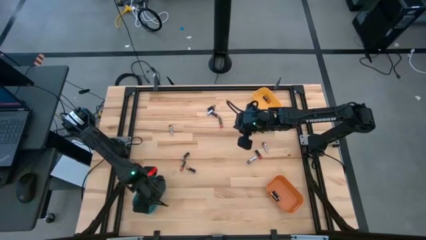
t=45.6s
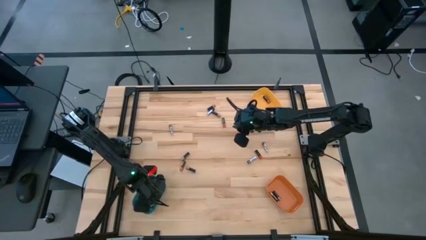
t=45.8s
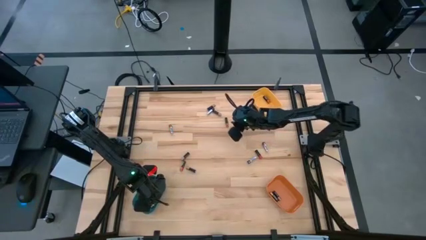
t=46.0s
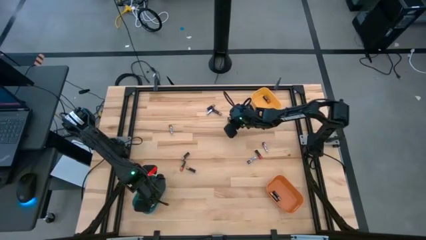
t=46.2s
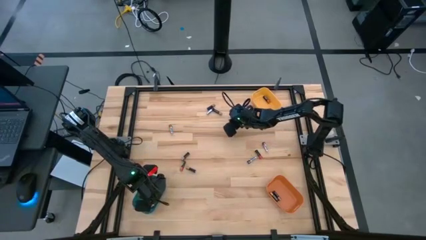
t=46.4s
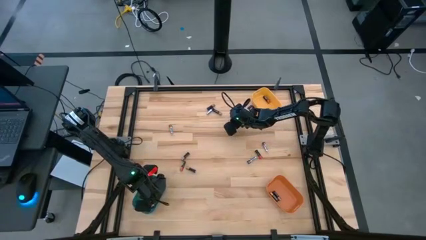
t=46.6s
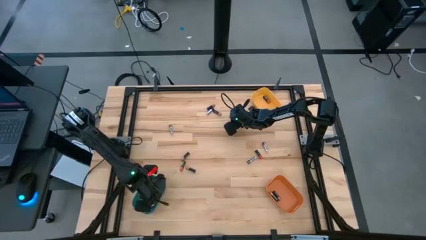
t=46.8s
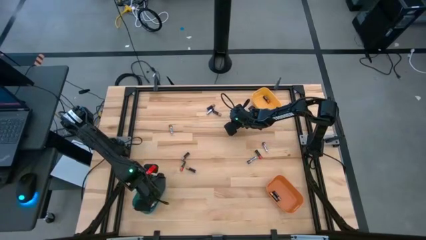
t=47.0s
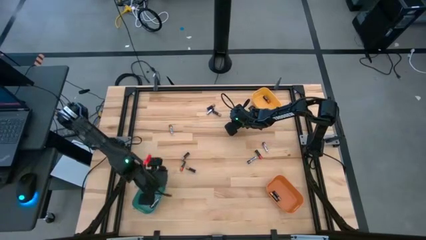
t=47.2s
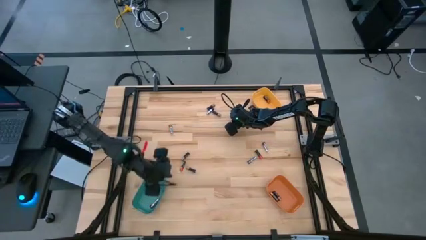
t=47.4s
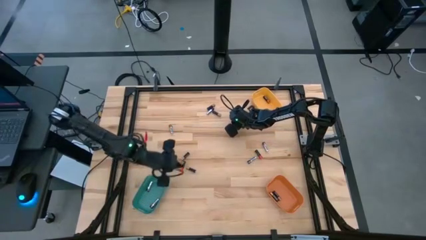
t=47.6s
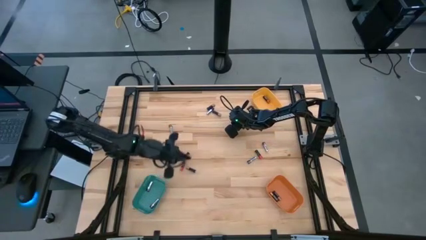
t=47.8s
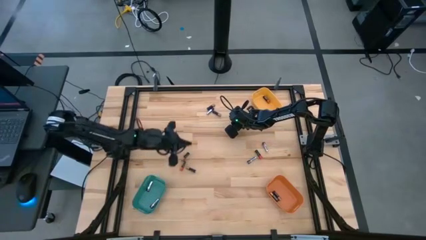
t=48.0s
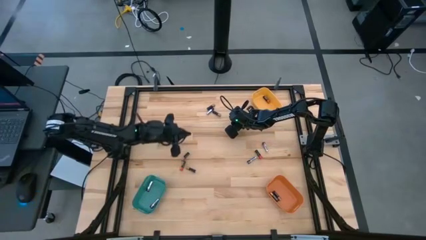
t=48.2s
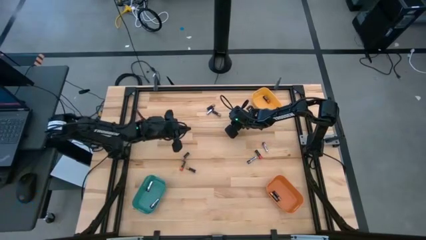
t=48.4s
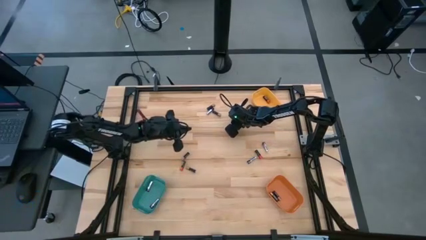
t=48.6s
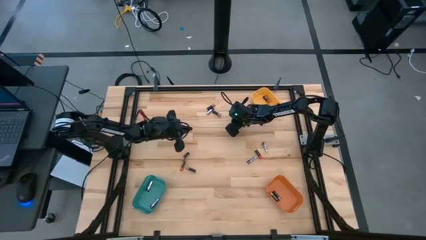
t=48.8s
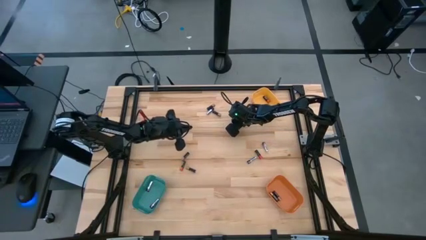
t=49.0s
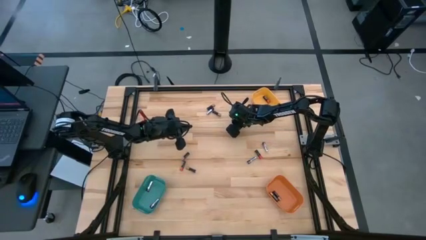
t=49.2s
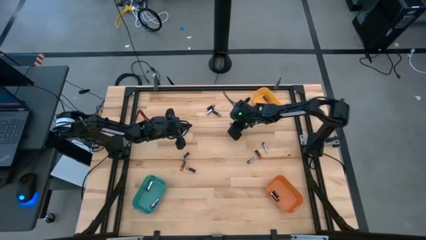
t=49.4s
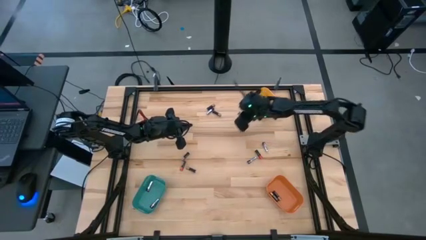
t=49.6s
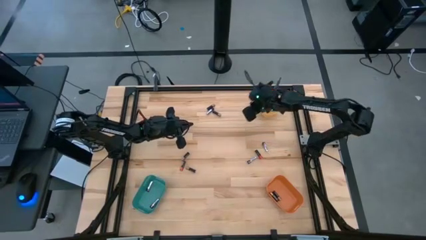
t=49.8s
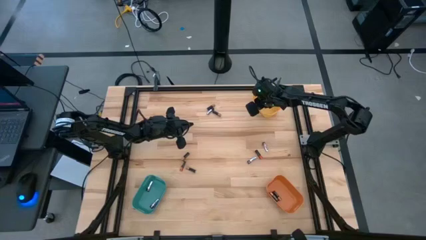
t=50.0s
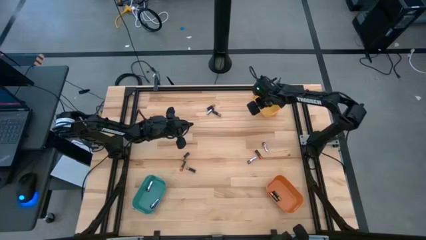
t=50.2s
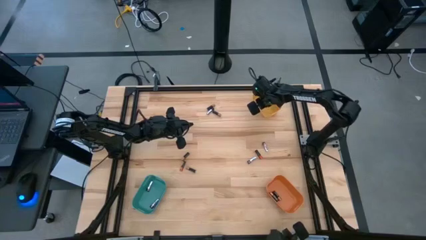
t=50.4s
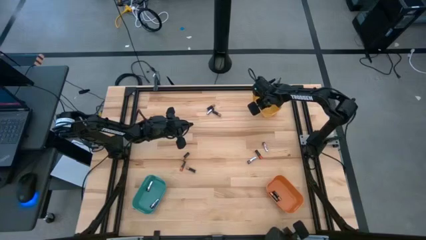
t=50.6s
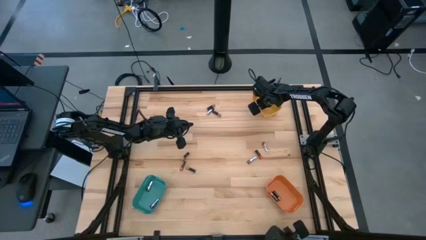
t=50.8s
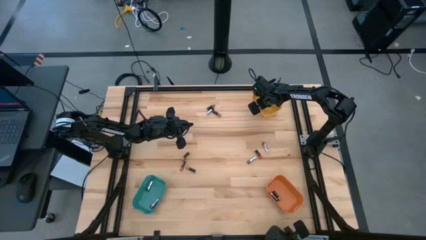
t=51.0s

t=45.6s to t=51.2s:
Task: Sort batteries
Put the red battery into the yellow bin

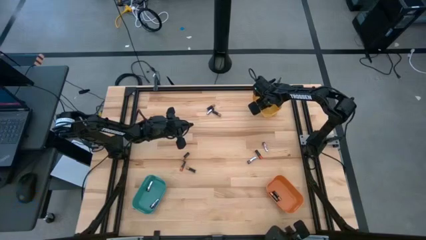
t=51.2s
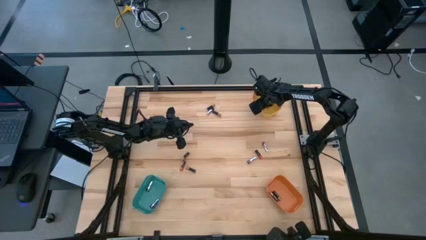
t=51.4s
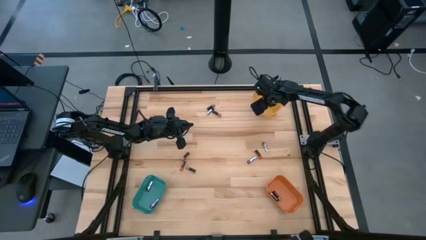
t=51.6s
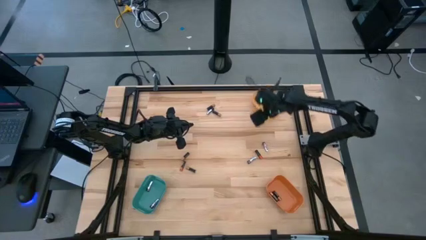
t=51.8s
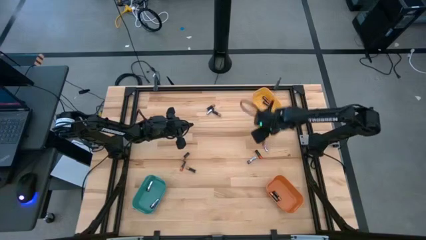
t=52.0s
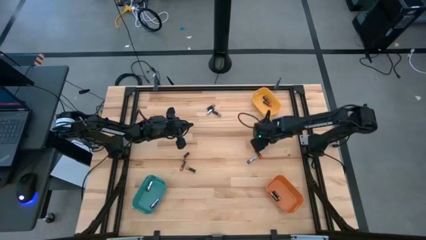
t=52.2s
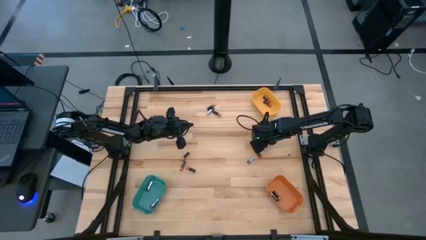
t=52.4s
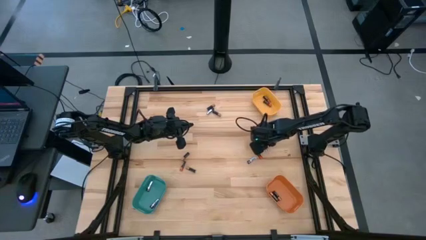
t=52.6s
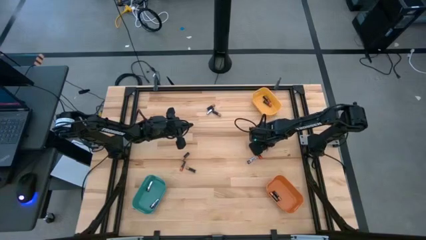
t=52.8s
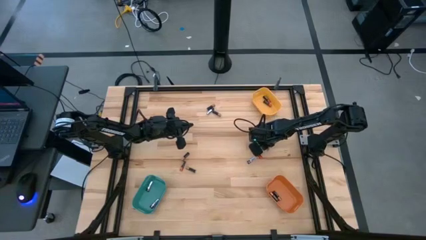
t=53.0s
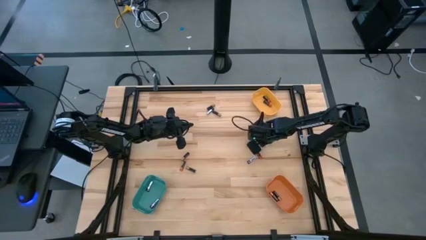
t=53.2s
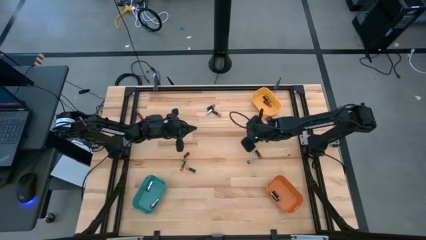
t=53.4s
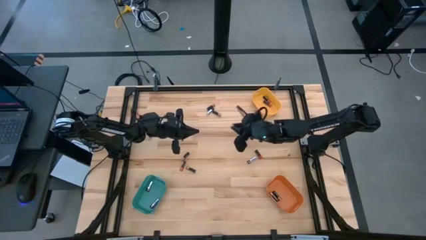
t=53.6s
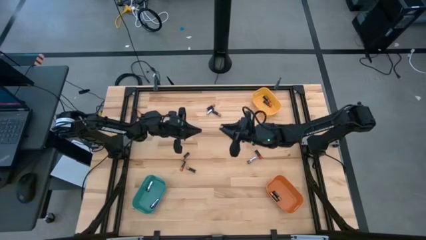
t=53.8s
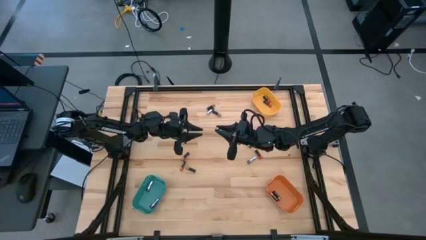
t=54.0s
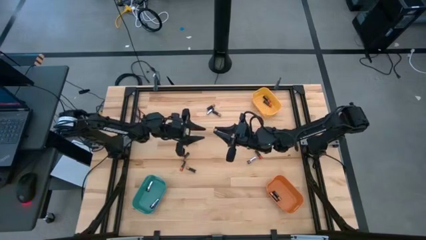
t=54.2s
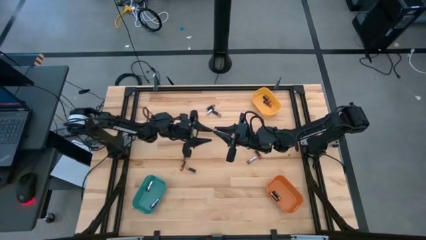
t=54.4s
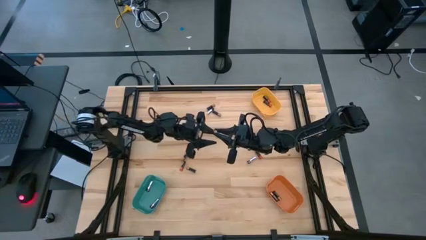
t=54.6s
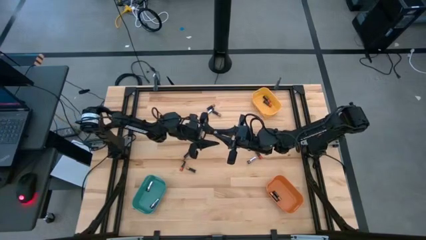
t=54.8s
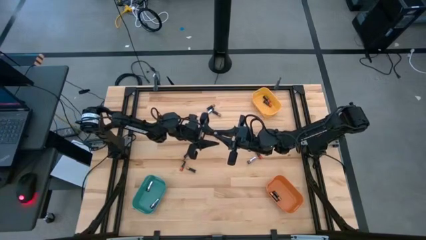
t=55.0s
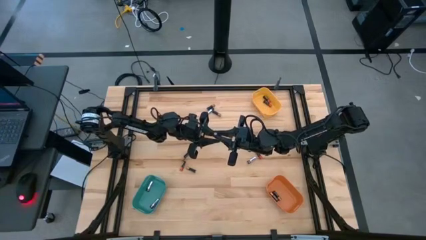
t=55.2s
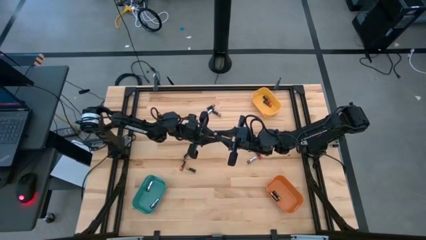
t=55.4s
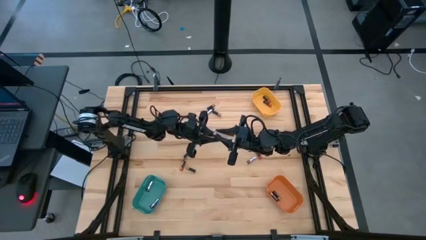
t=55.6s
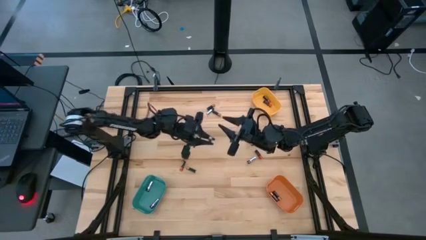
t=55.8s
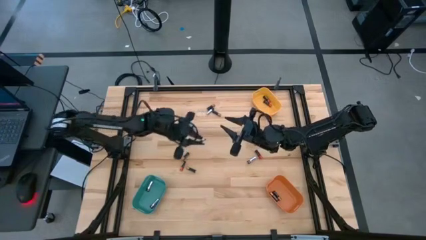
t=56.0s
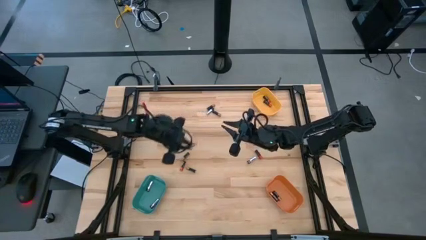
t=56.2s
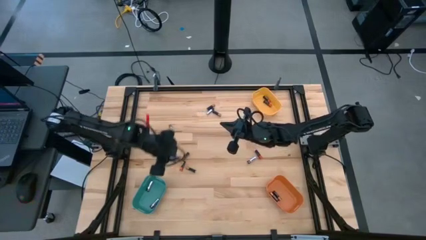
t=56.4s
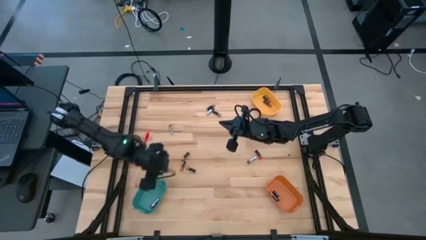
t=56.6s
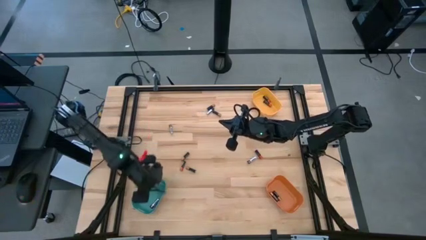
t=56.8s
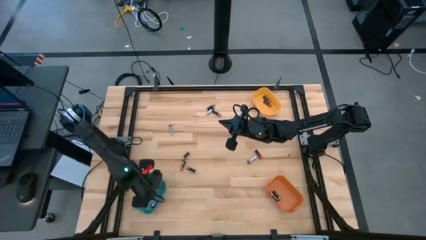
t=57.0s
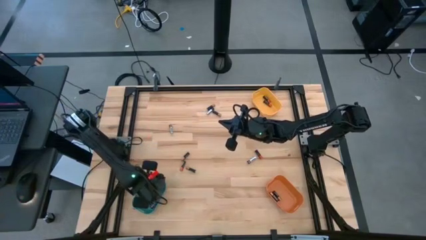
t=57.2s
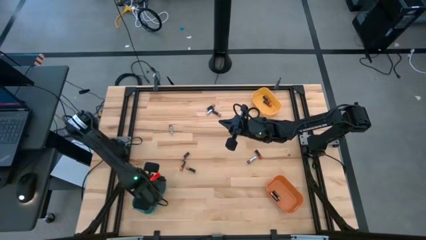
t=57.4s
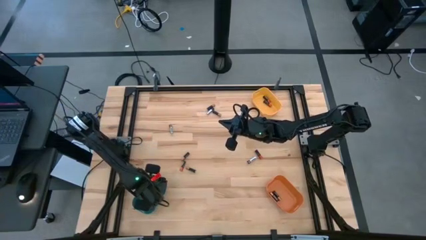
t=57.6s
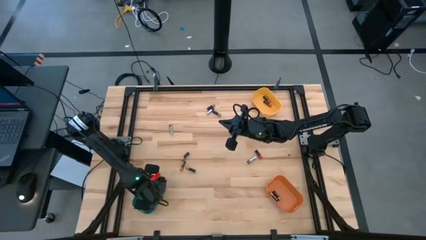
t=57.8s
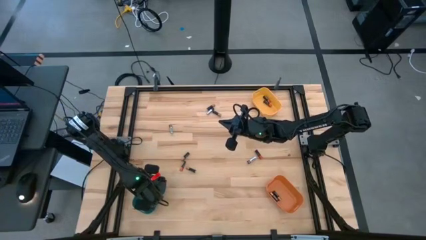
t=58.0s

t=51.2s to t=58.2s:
Put the silver battery into the green bin

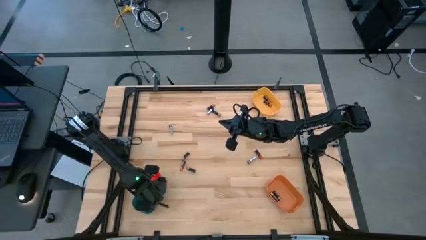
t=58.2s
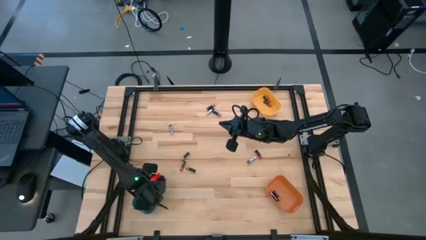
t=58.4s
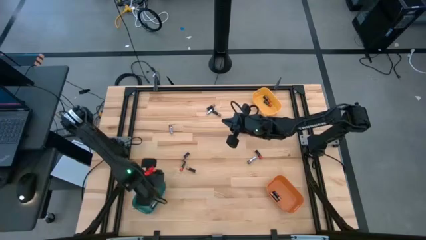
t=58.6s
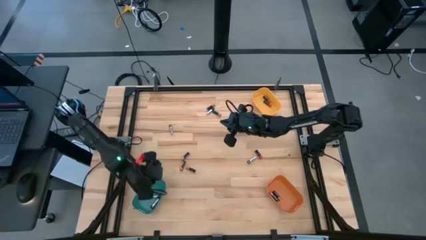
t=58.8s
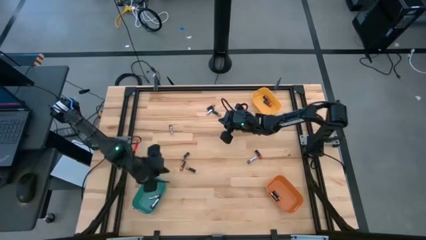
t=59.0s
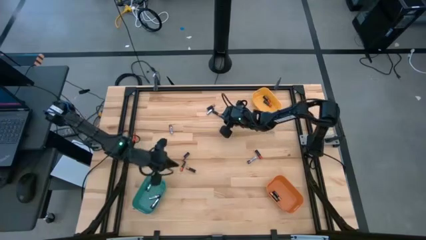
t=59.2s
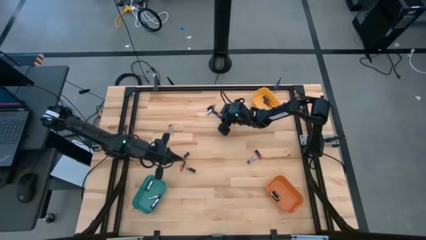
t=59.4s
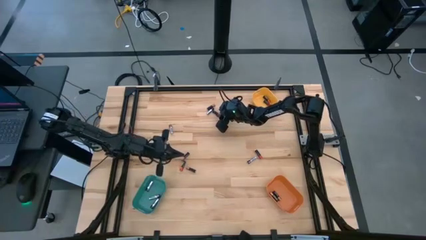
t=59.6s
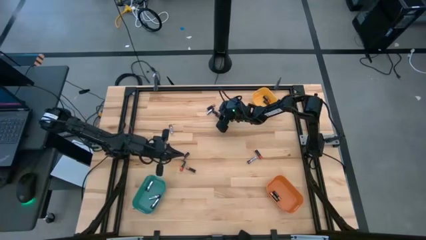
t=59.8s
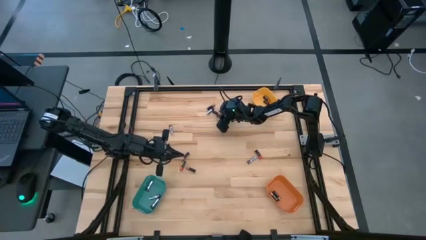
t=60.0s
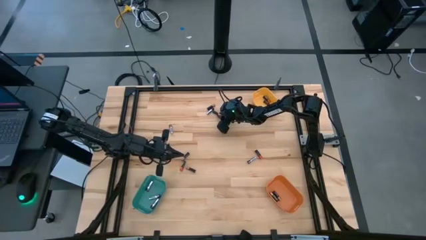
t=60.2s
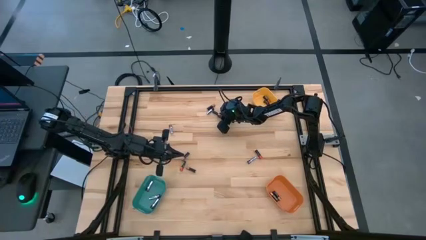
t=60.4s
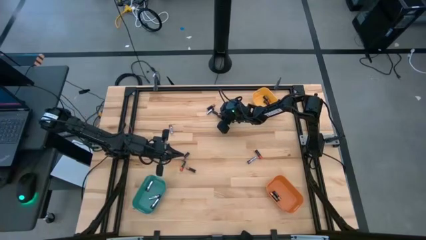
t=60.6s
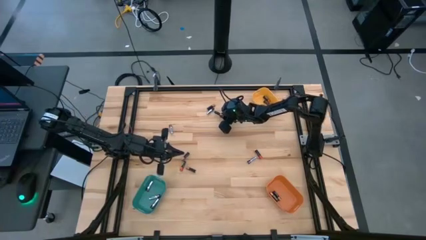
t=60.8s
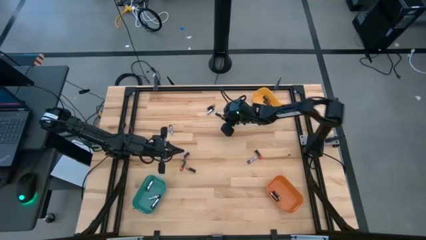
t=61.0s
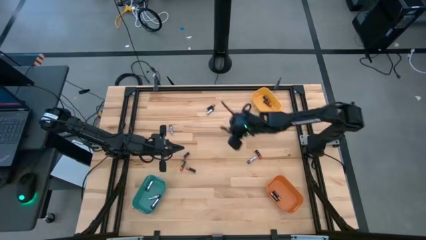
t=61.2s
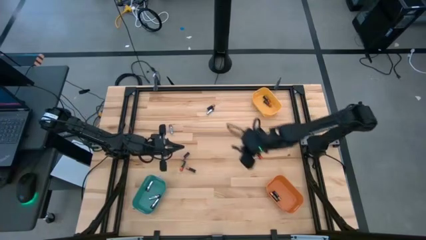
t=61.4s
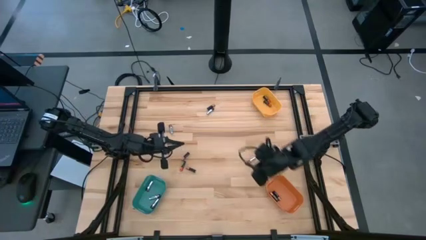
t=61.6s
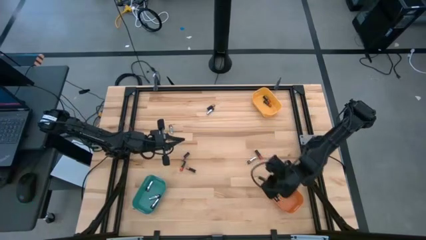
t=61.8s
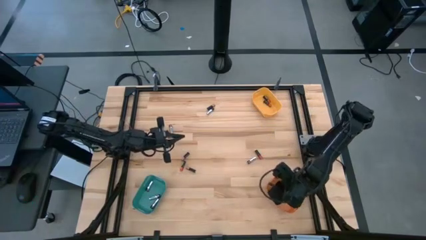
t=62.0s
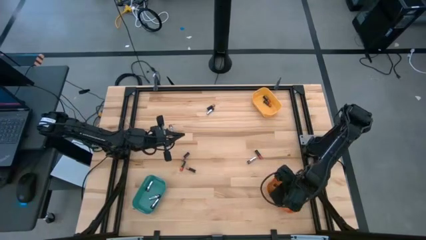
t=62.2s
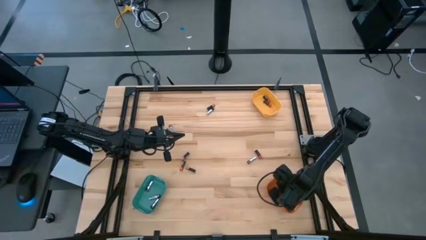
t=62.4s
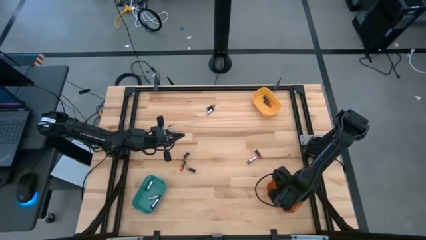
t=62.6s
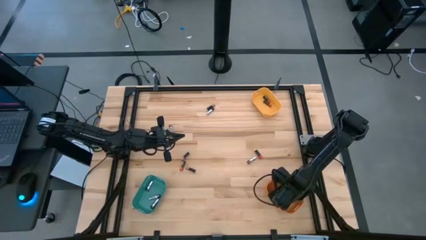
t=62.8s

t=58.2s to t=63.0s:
Put the brown battery into the orange bin
